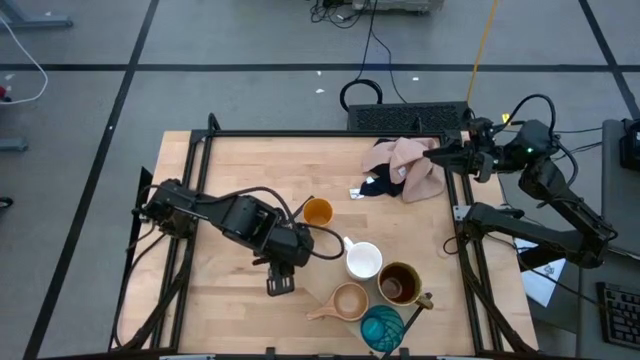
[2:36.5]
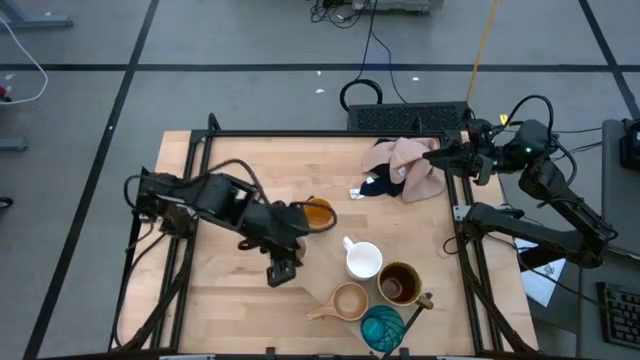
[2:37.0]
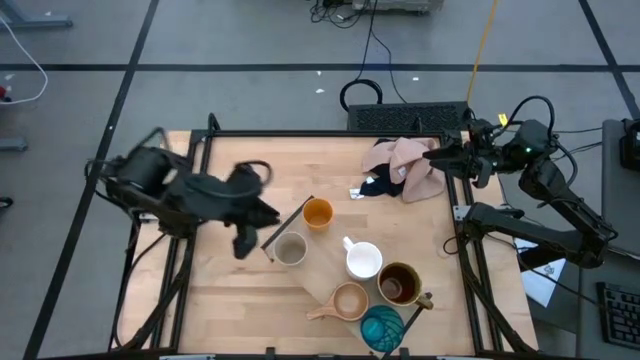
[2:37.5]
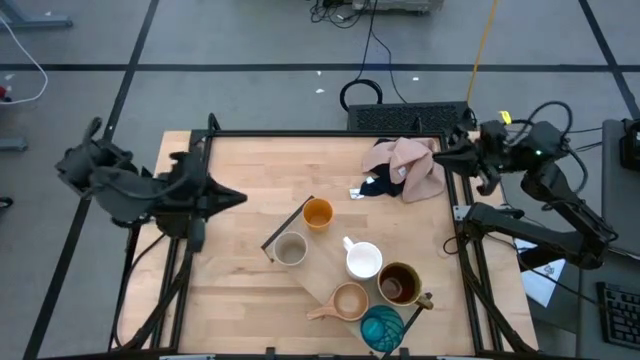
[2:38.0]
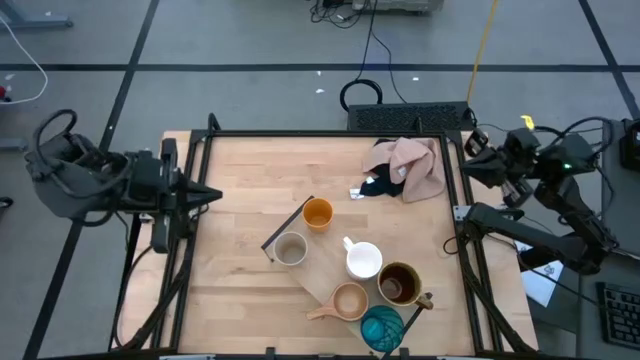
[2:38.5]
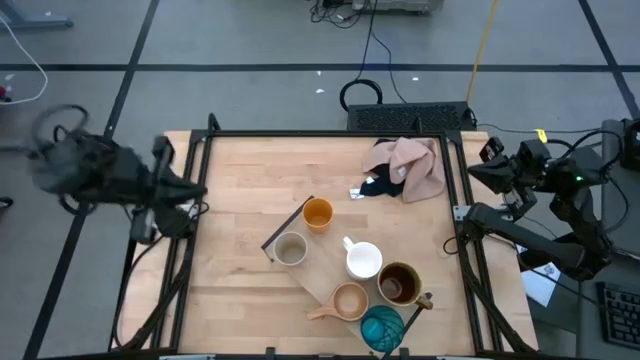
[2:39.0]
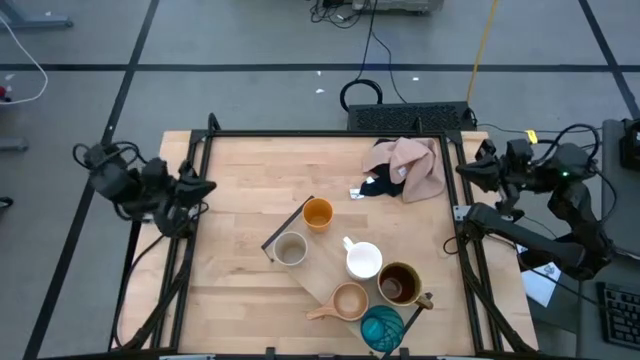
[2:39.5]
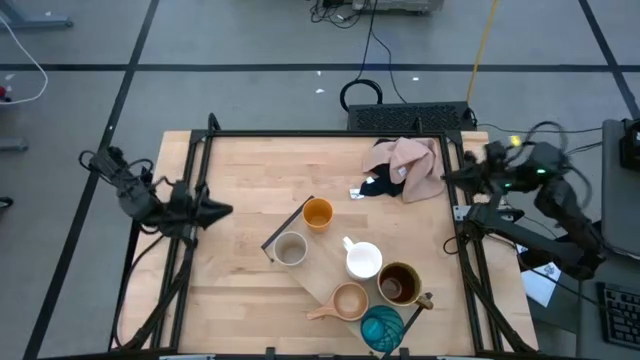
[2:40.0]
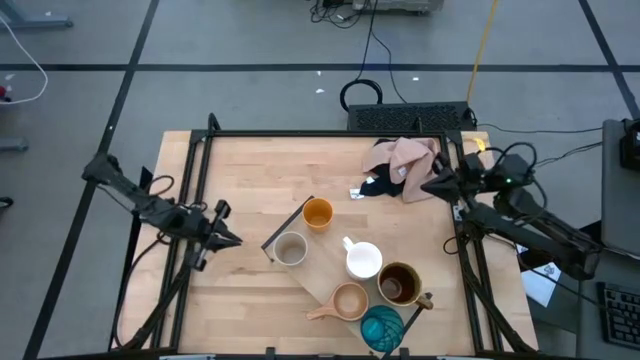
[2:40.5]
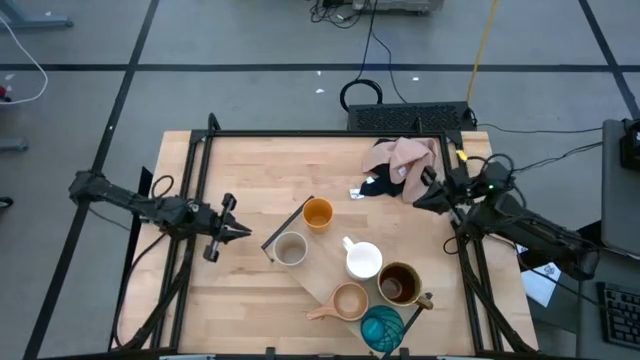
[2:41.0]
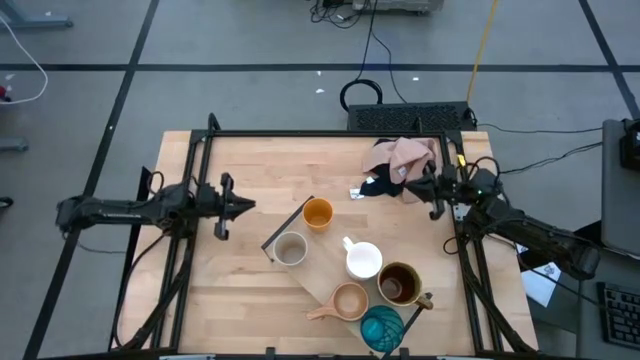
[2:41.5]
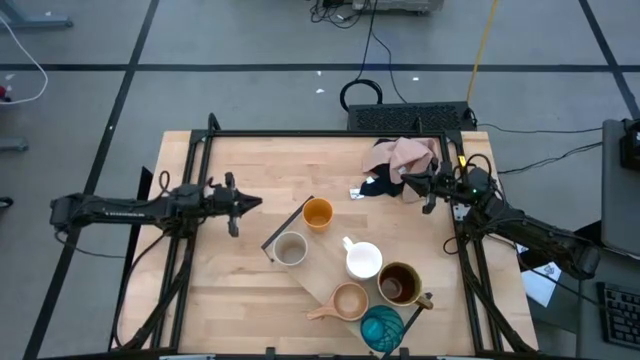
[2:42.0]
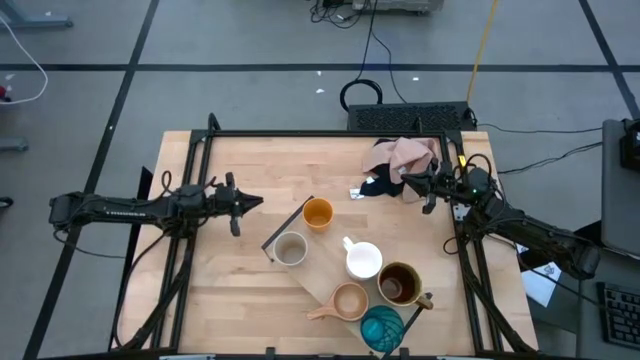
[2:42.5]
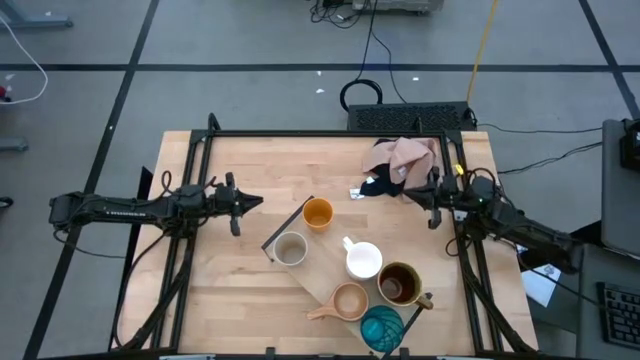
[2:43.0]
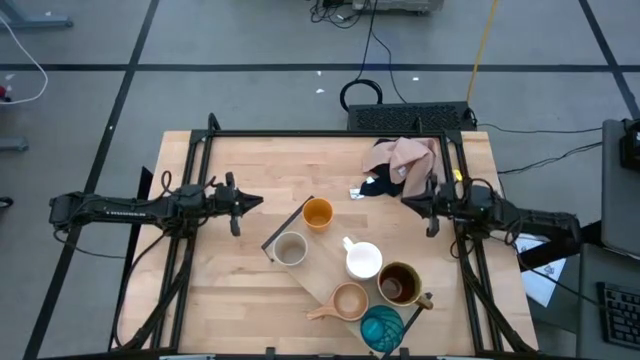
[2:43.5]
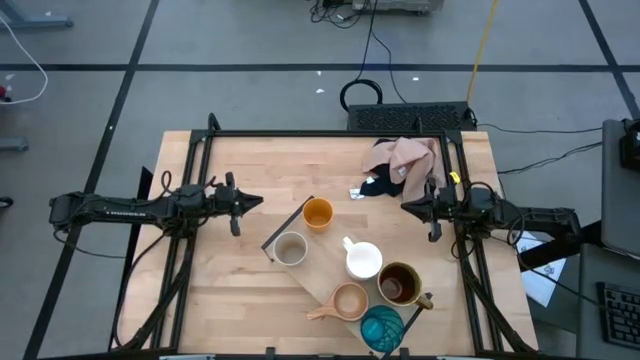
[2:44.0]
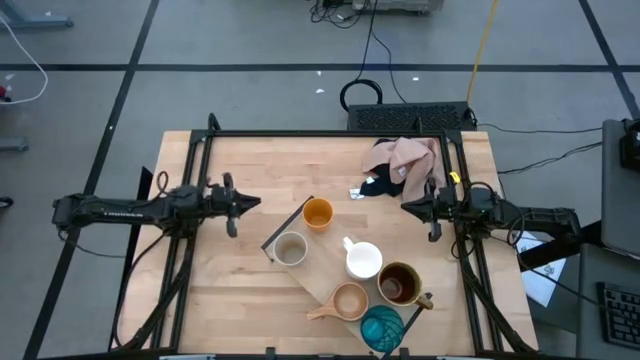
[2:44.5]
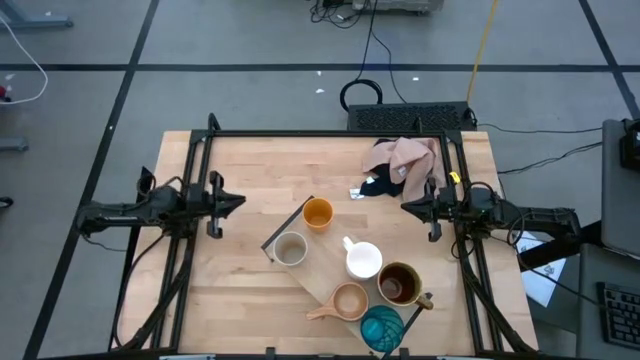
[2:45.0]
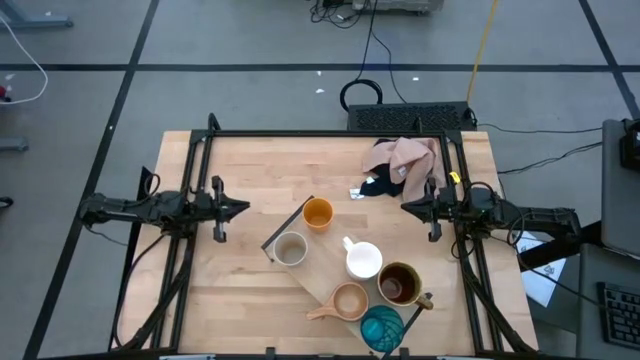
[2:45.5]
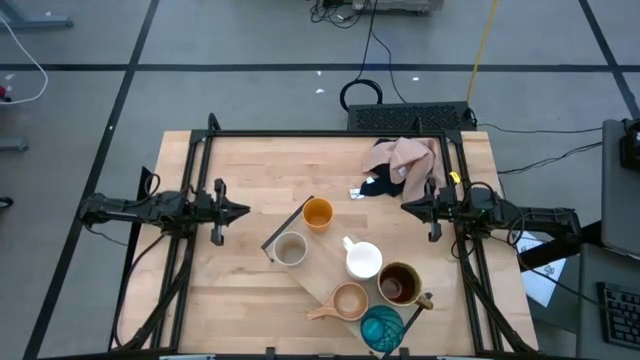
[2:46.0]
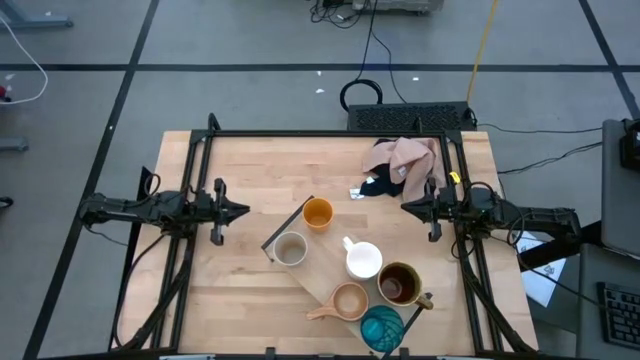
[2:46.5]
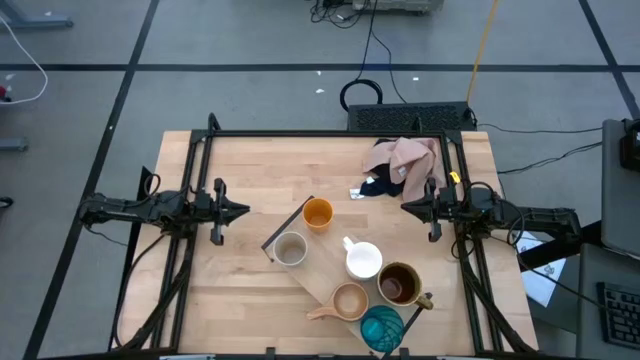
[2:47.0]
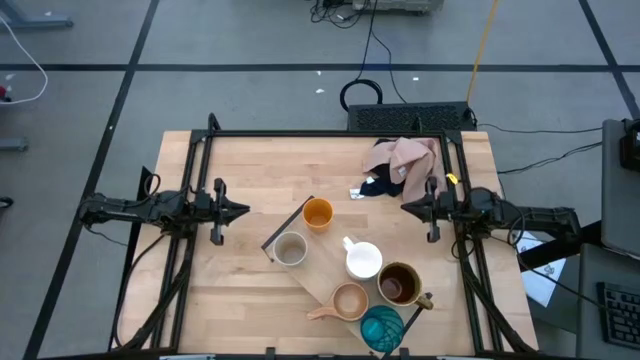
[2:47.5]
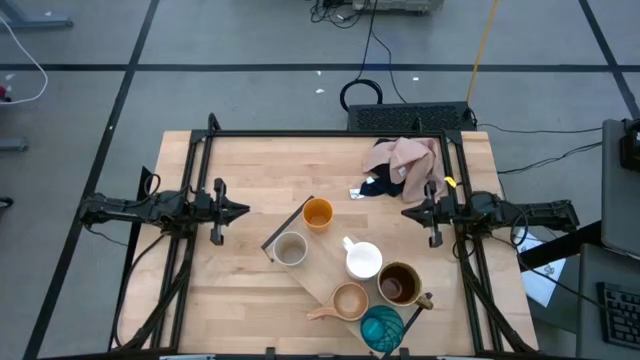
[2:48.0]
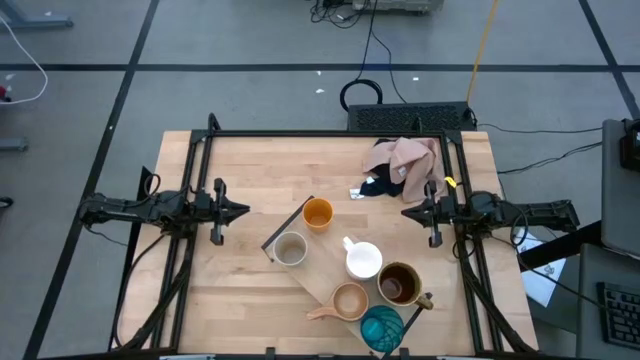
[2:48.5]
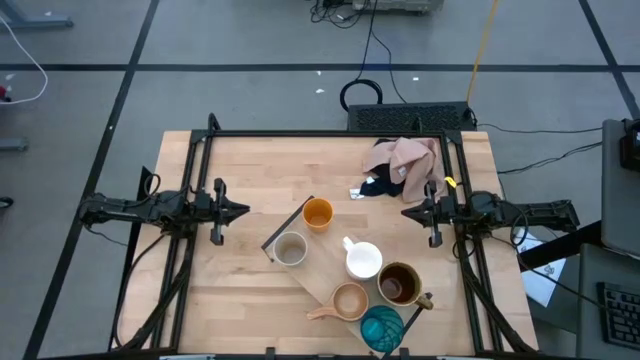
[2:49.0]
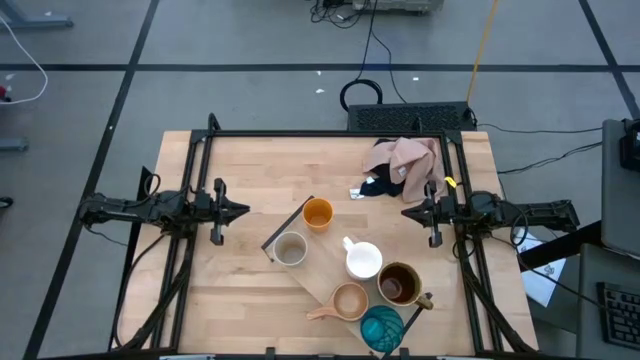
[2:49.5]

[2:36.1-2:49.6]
Task: Stack small to large cups/mugs on shelf
Return to Home Position

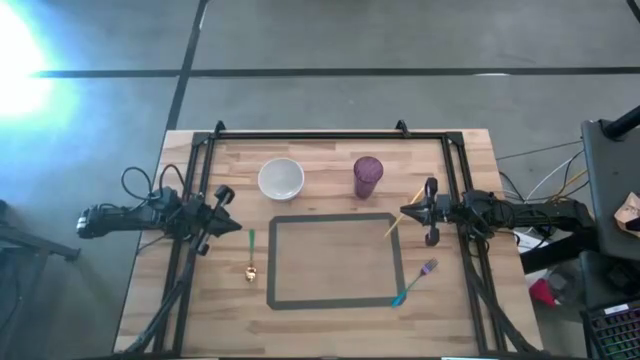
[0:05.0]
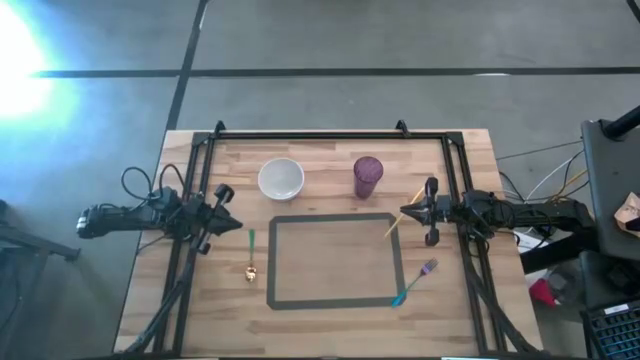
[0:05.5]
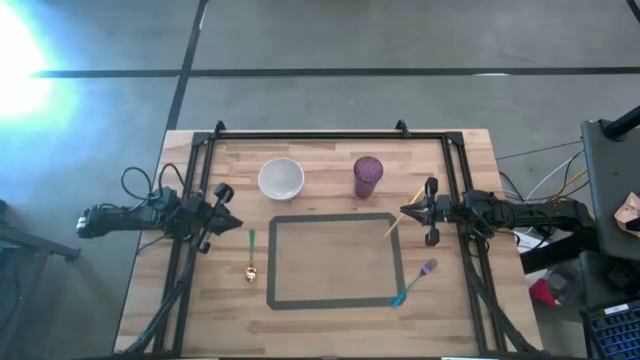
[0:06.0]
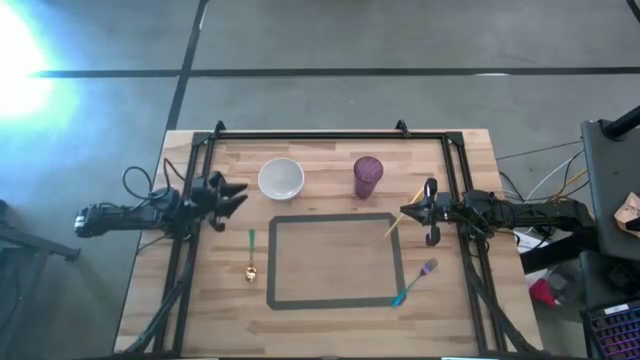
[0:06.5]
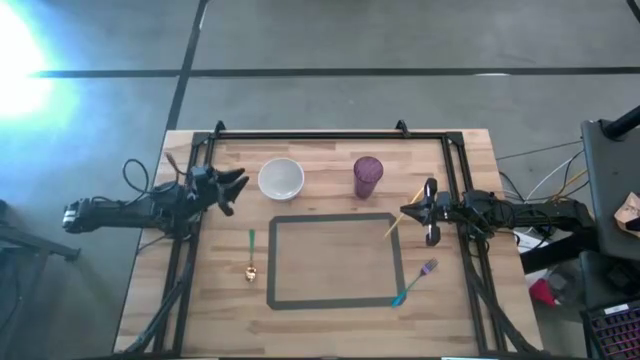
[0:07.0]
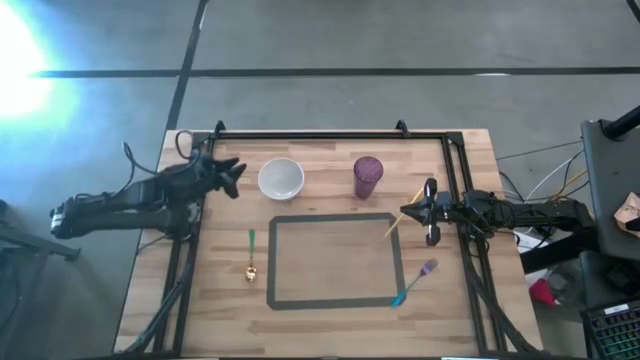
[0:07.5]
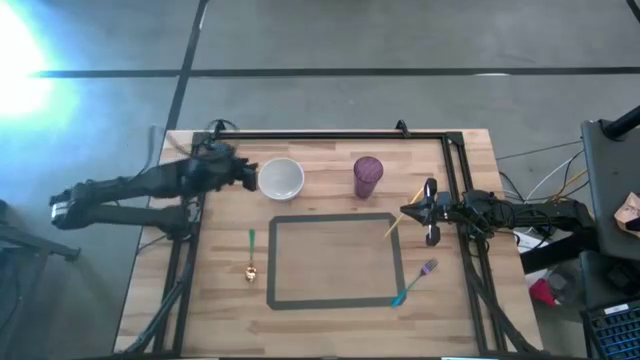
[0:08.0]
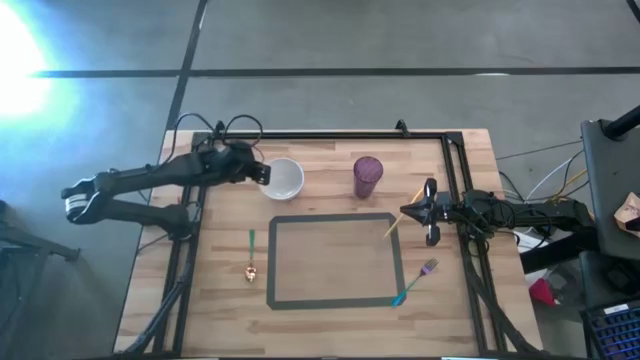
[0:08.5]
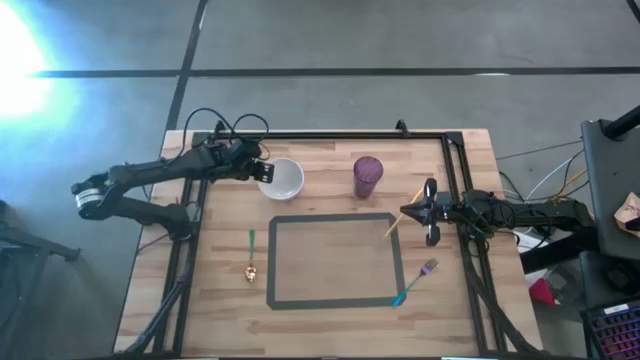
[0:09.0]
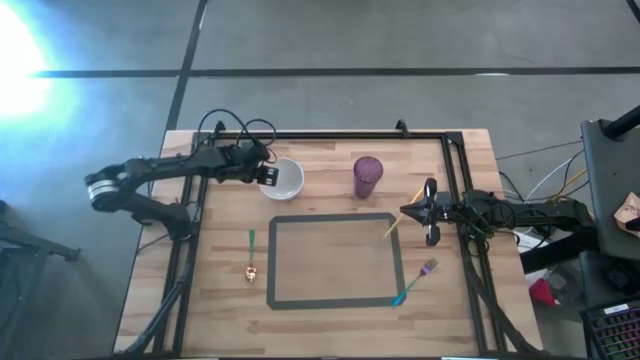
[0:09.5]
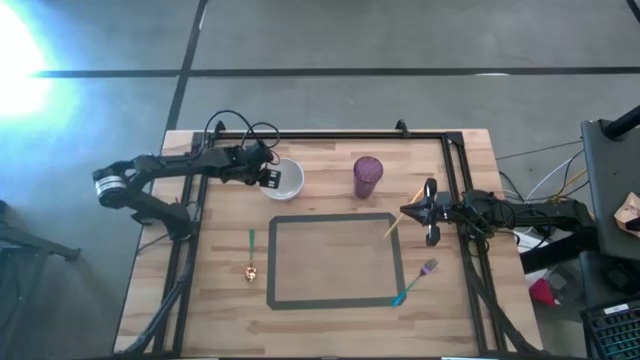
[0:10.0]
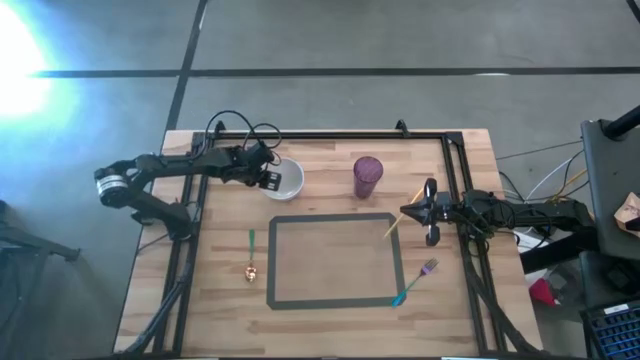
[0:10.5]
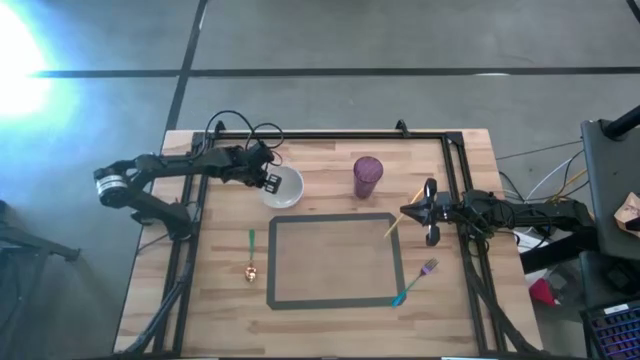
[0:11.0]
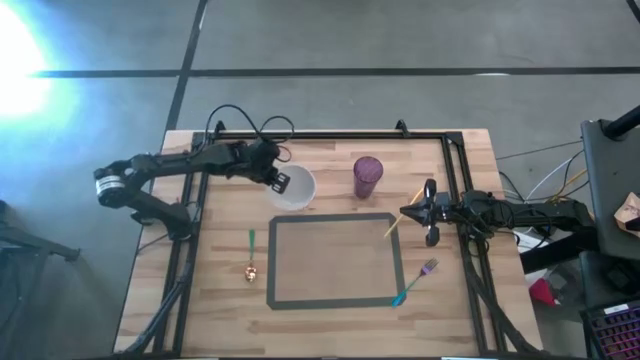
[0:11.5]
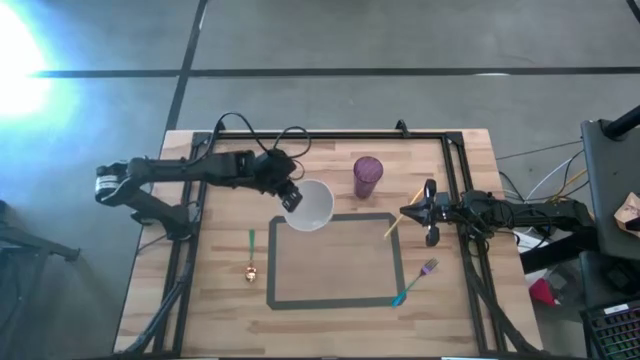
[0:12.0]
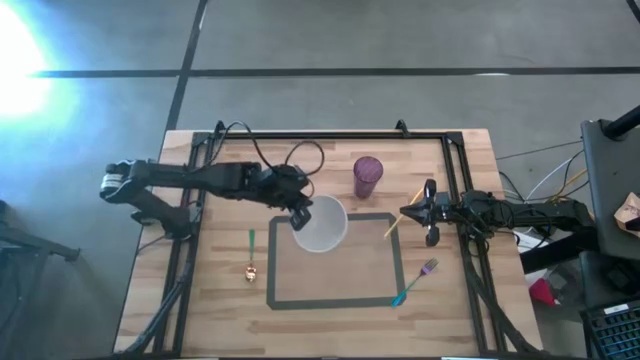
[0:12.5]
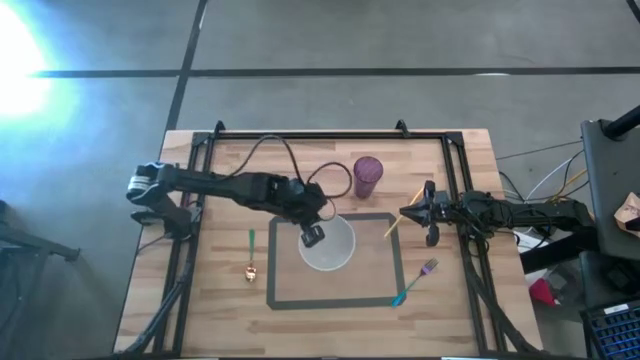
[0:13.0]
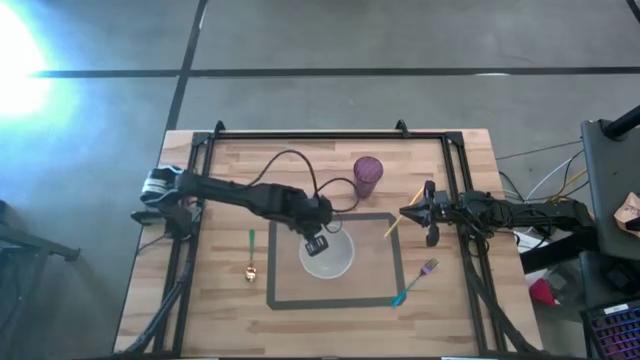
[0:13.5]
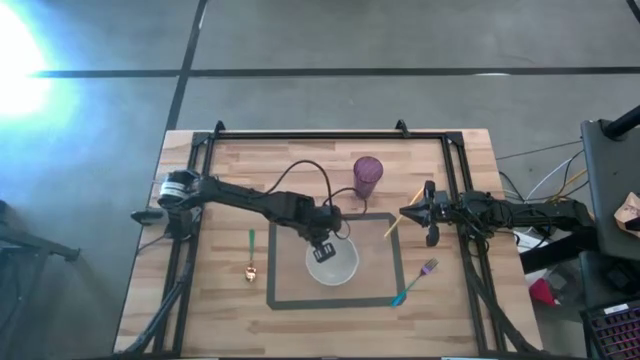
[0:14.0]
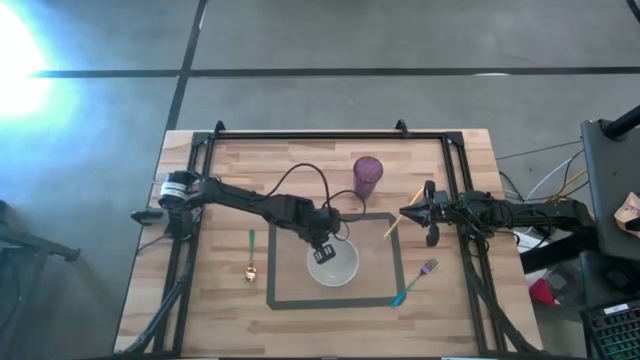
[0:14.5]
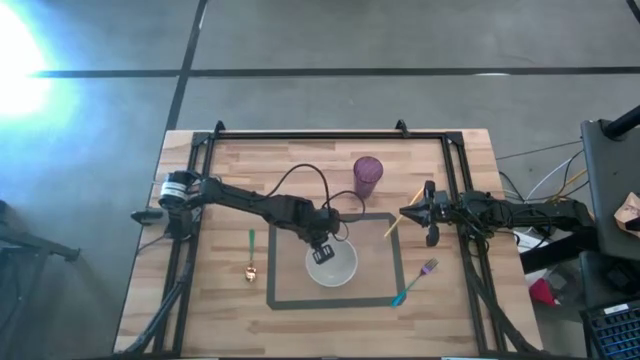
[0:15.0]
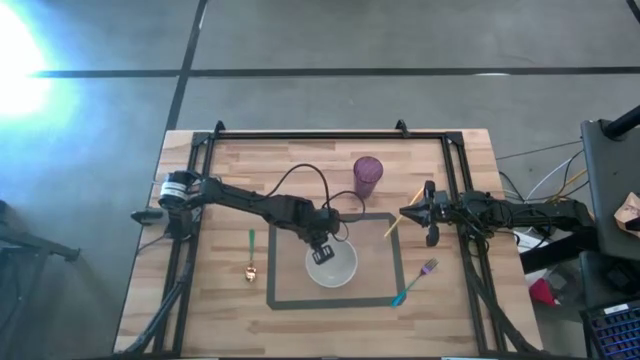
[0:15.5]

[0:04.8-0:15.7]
Task: Pick & Place Utensil
Put the white bowl on the center of the mat
